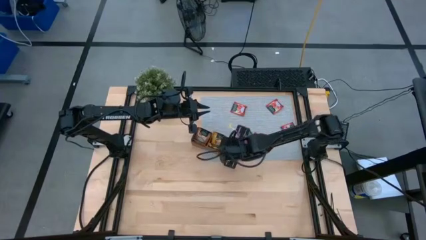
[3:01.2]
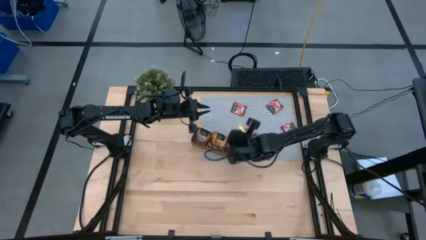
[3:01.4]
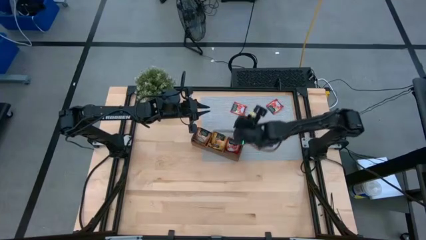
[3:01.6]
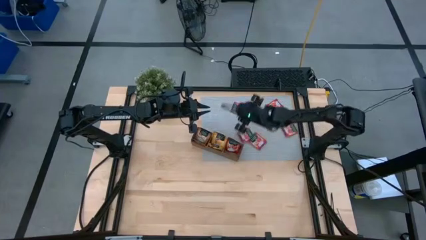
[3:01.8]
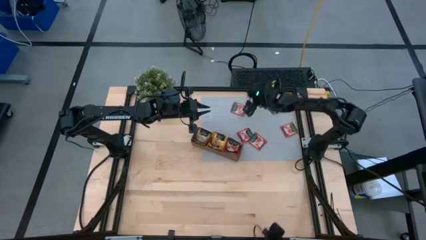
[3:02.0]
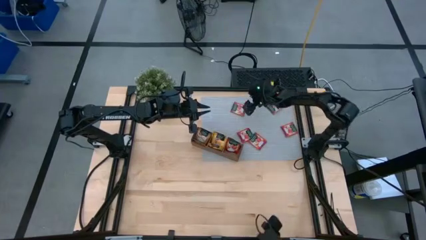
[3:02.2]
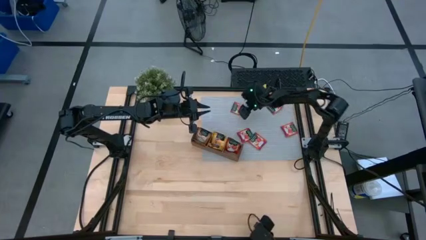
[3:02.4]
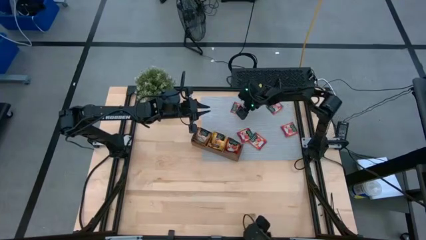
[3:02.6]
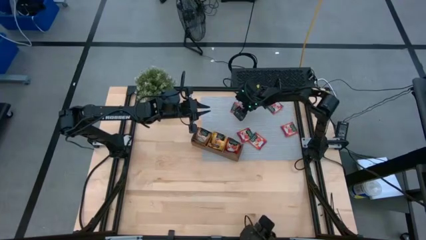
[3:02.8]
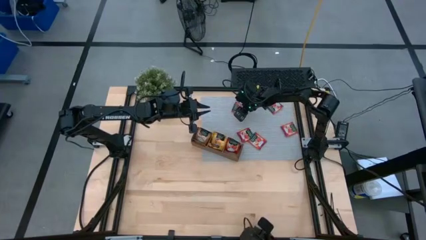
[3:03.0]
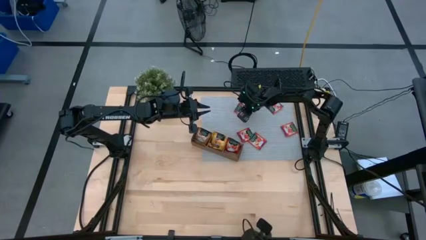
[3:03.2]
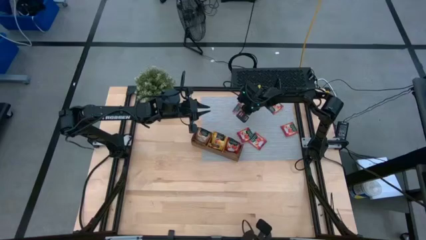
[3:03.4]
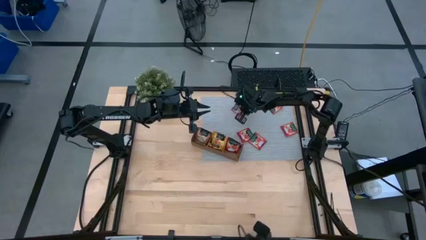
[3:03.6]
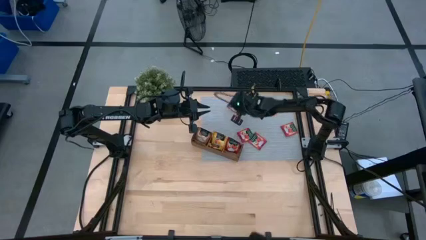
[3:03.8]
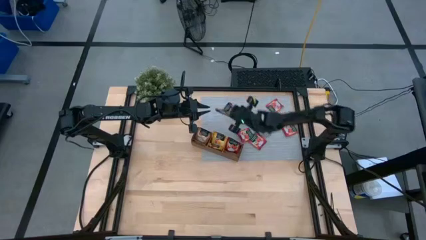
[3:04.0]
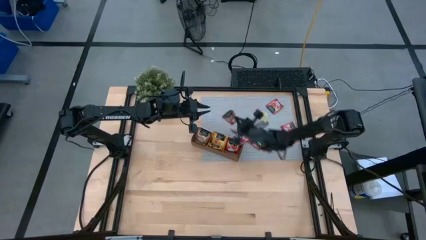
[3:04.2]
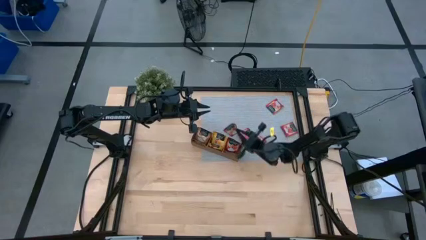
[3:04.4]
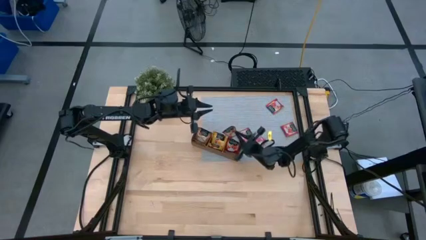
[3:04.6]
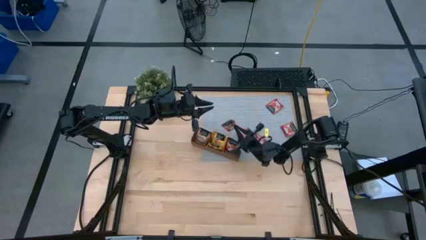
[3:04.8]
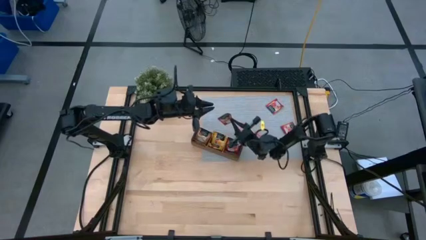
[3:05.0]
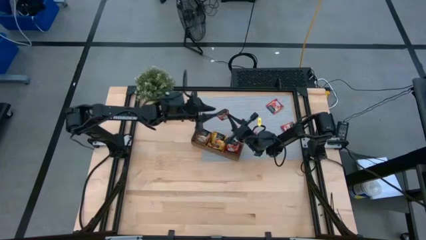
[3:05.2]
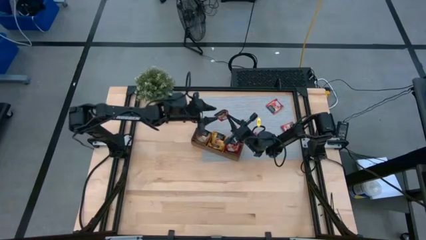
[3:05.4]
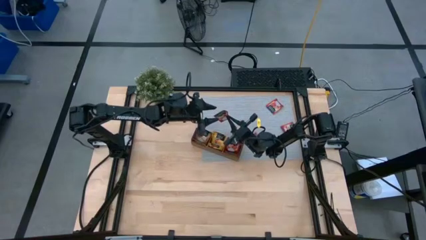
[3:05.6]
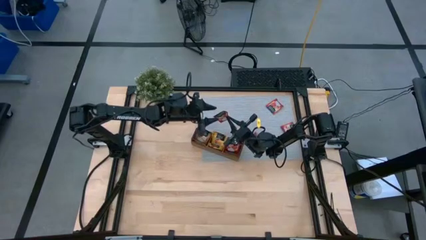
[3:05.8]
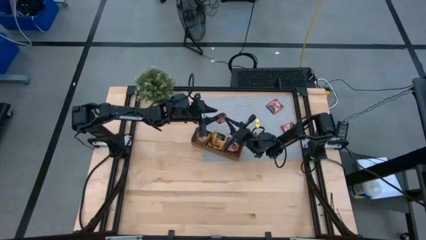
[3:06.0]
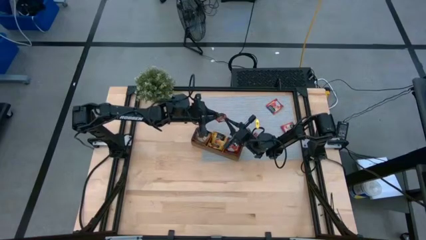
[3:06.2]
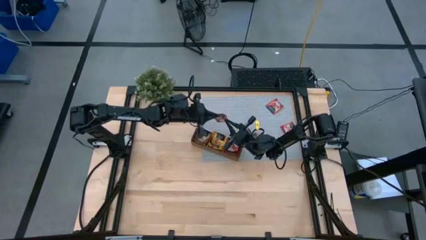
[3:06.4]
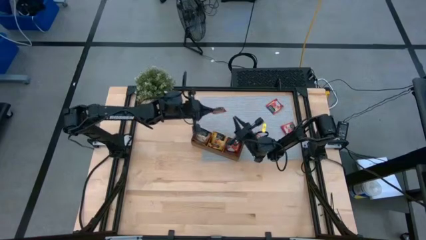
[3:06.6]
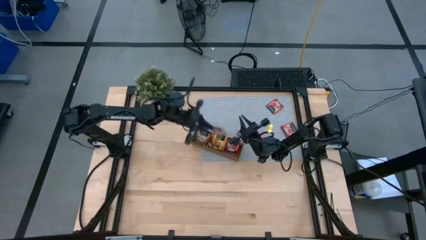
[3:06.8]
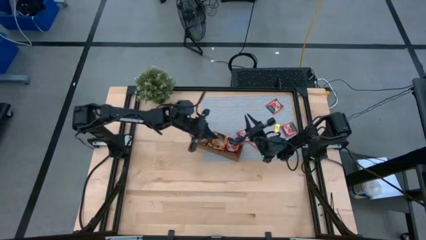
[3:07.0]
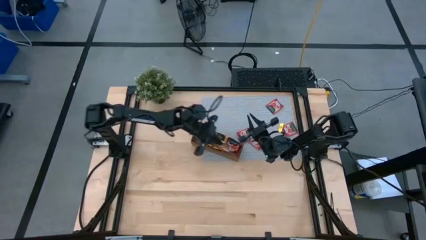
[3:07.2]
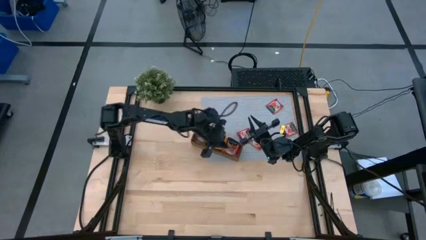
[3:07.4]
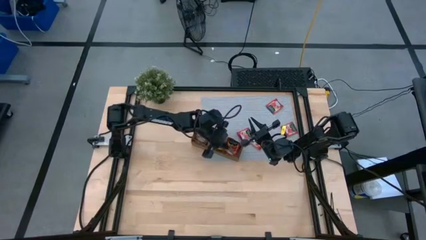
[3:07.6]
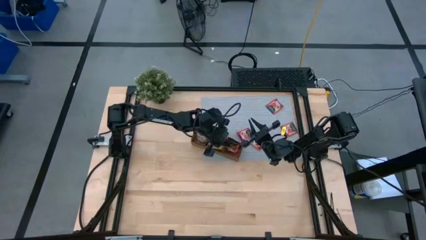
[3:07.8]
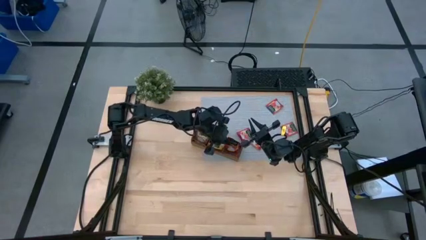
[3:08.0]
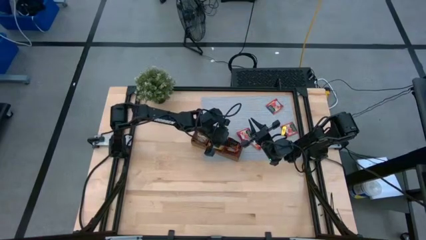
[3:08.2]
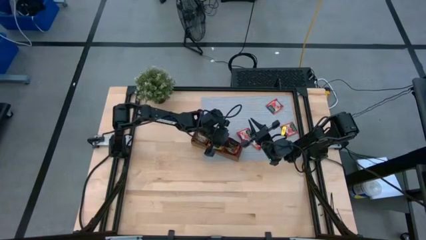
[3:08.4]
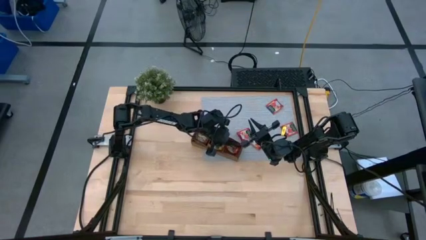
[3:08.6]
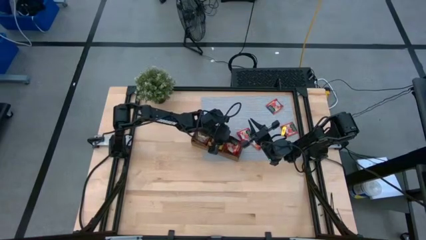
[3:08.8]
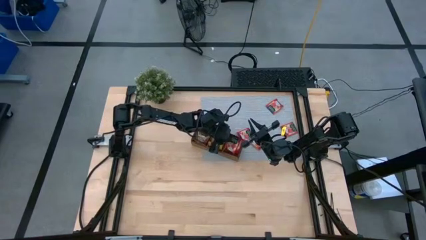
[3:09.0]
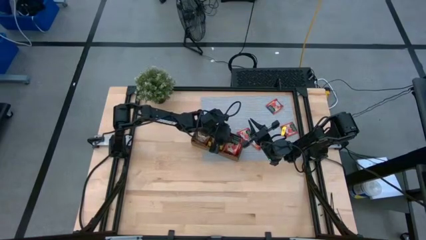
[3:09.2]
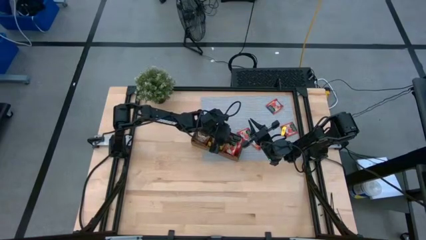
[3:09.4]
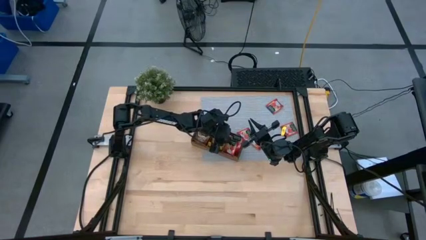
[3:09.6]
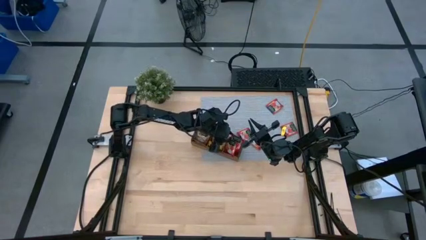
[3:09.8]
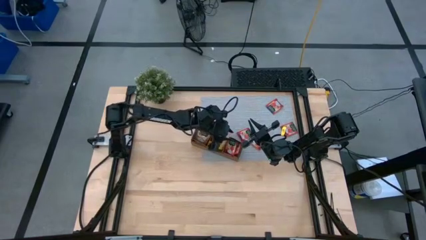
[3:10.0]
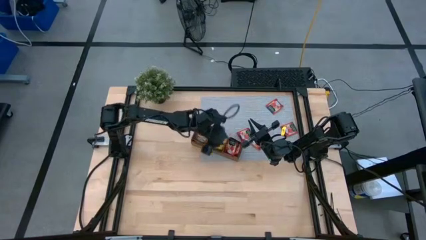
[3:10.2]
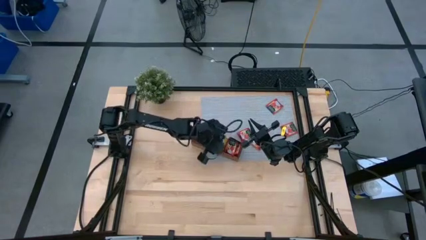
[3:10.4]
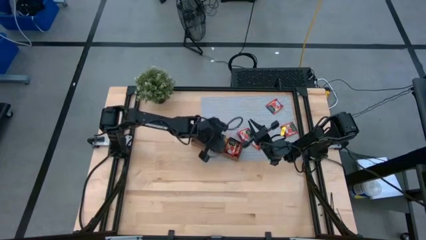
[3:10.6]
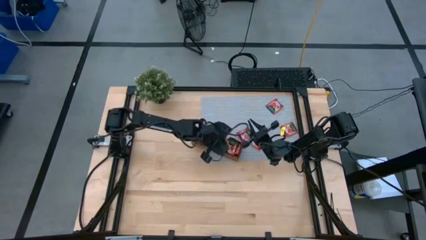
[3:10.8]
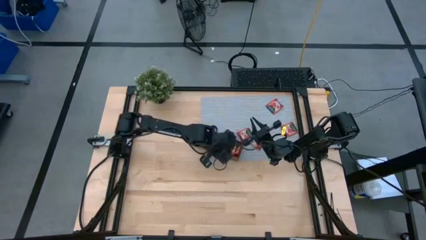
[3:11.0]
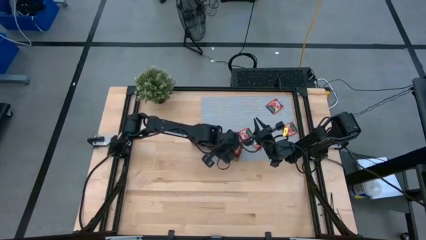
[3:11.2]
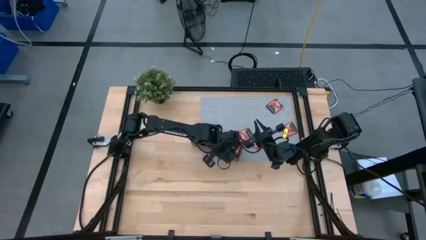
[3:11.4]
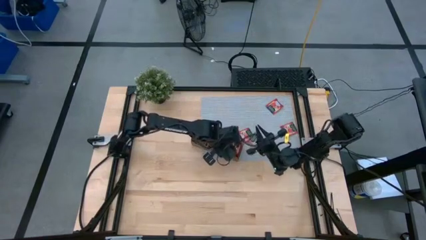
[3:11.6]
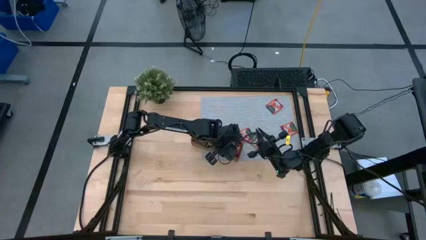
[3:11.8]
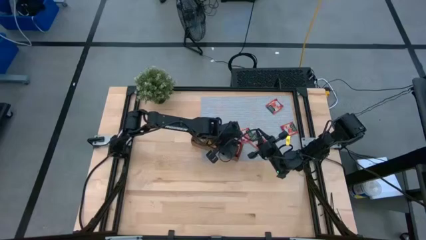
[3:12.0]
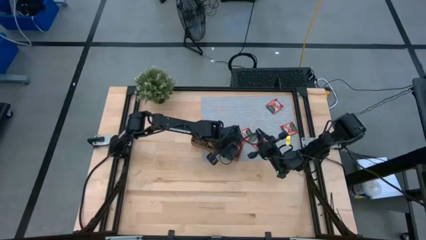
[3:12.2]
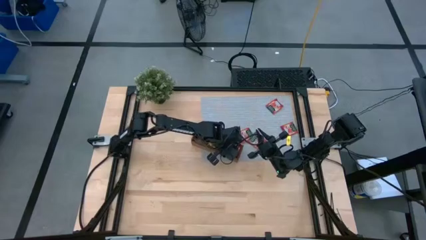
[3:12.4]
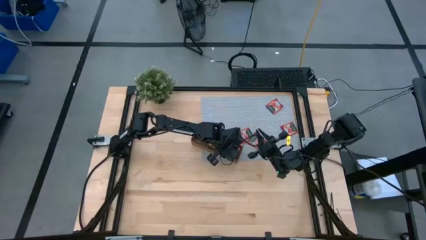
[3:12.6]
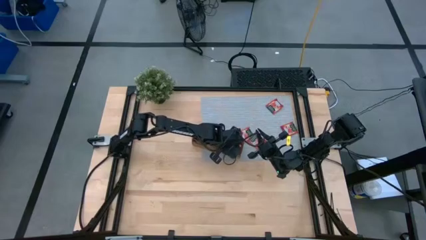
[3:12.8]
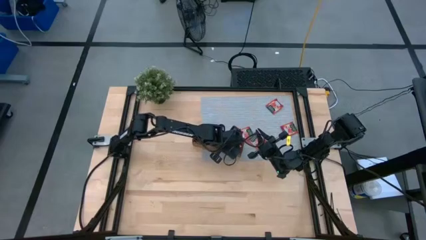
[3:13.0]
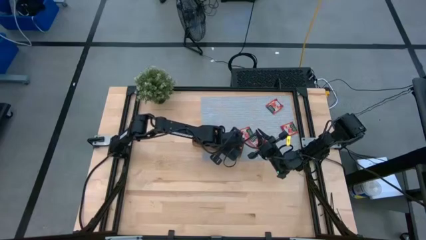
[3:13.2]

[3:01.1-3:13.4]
Task: Pick & Place Tea
Put the red tea bag into the right section of the wooden organizer
